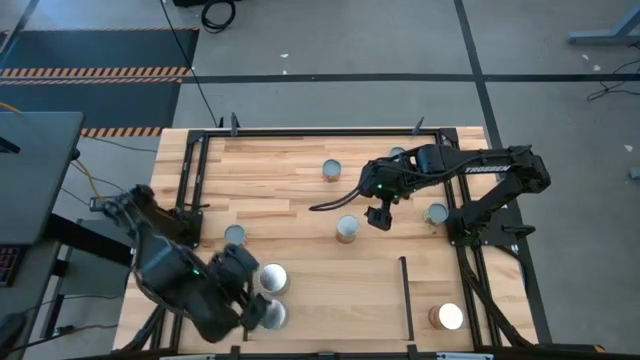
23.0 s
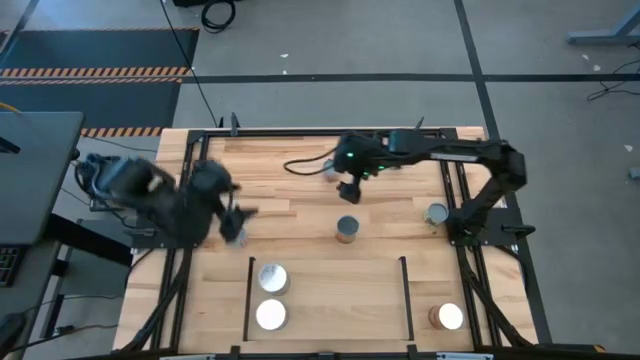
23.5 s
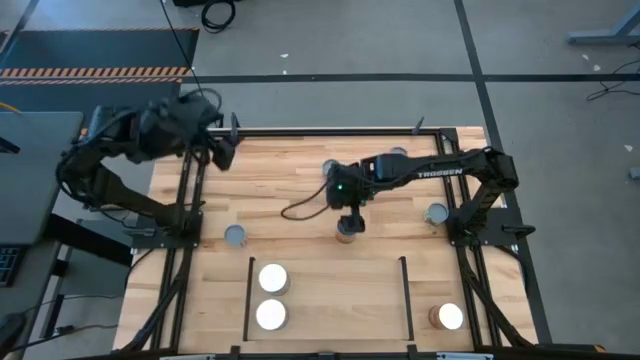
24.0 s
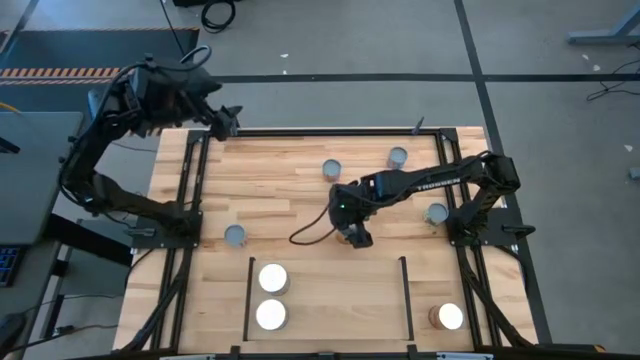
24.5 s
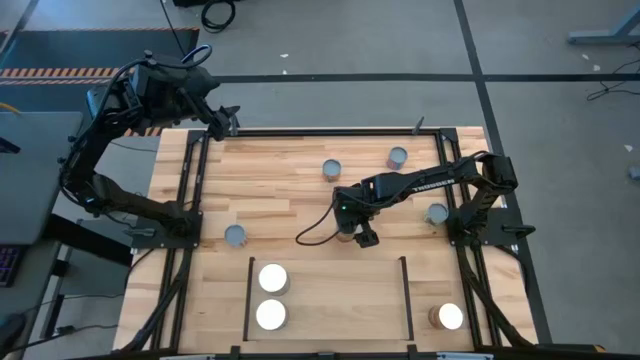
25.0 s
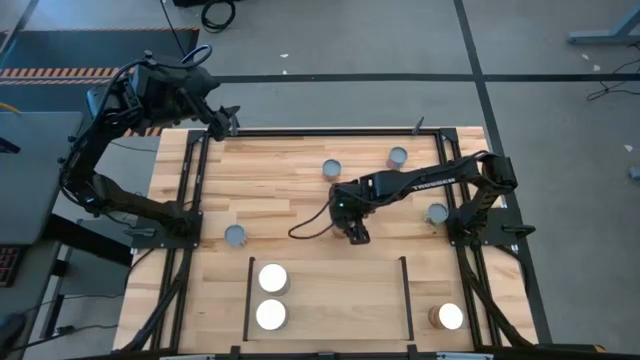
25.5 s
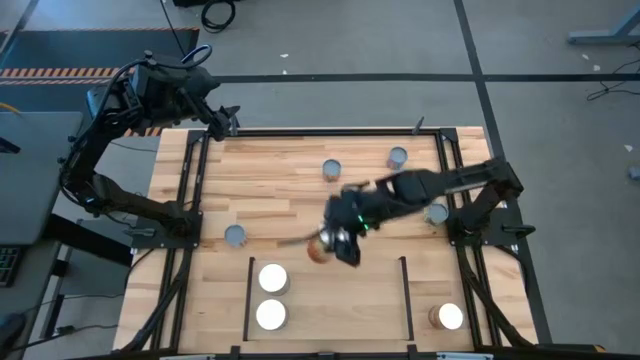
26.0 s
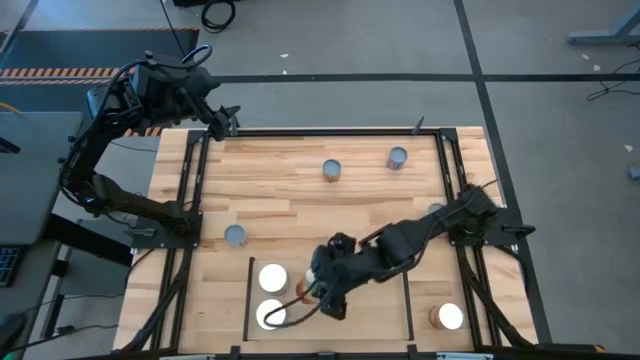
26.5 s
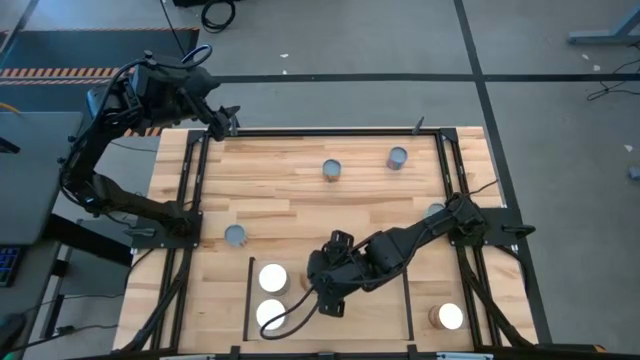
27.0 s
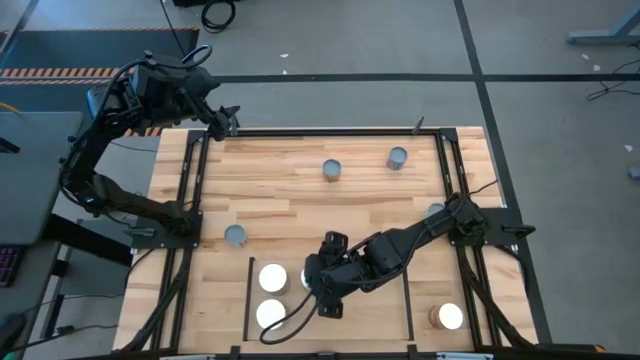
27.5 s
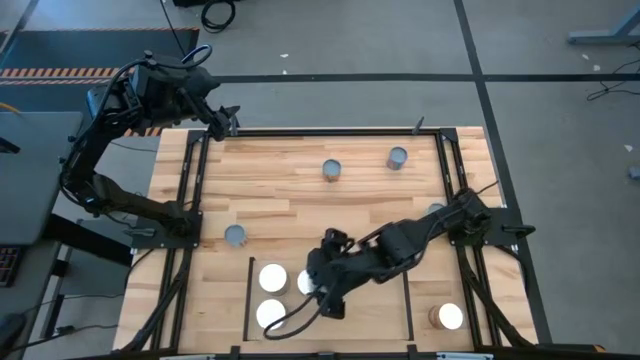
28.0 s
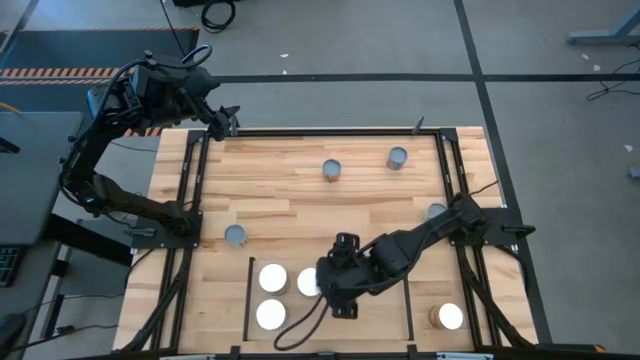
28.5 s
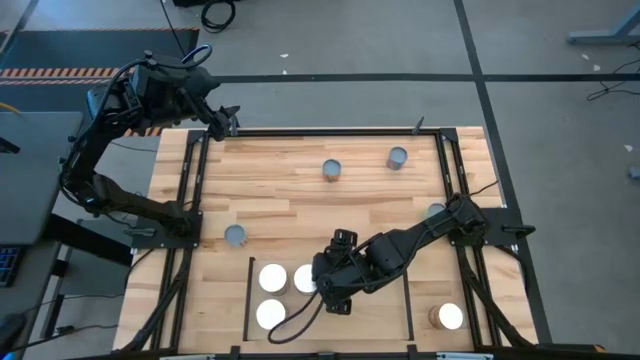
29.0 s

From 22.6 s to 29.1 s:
Task: Pick and place cans onto a shelf
Put the top large canned corn on the shelf

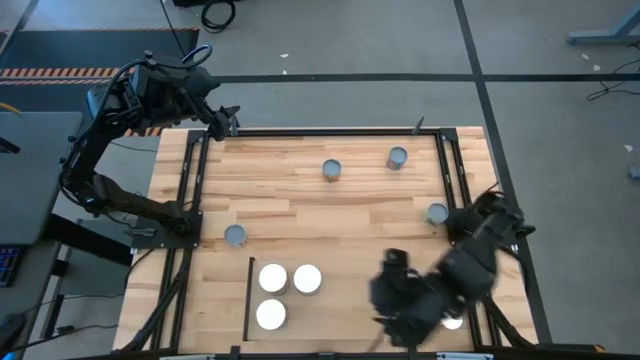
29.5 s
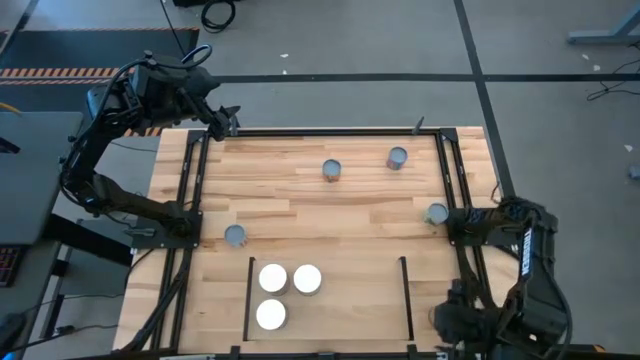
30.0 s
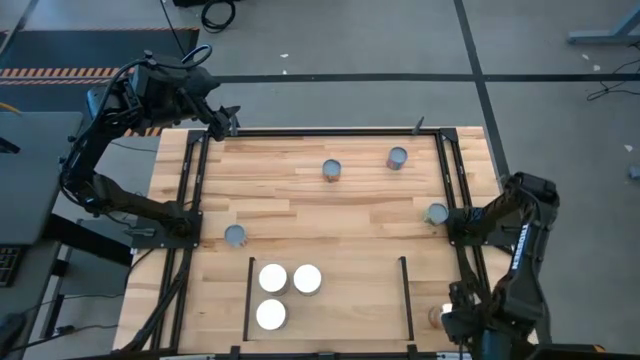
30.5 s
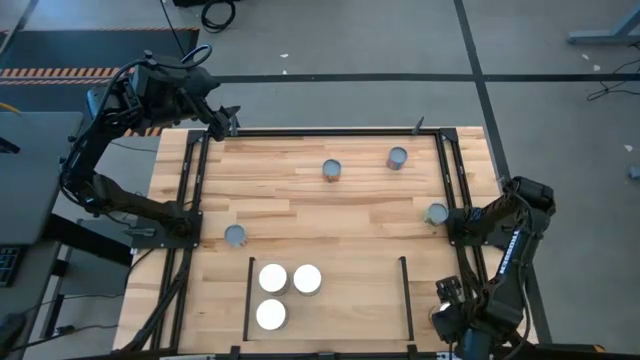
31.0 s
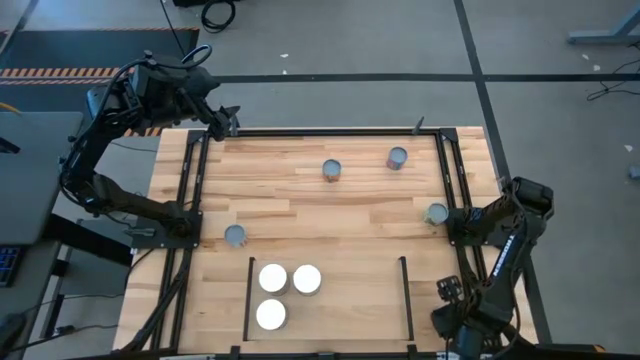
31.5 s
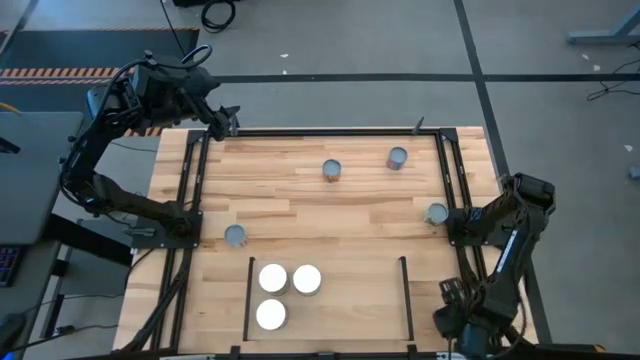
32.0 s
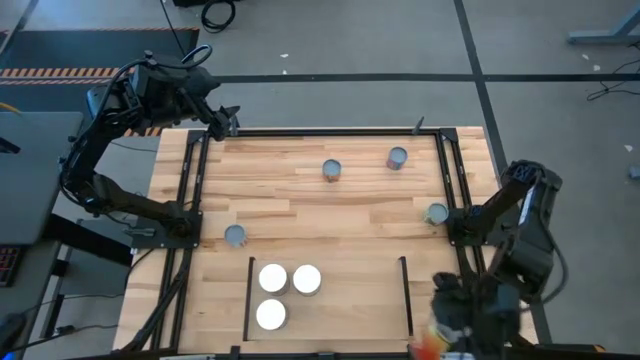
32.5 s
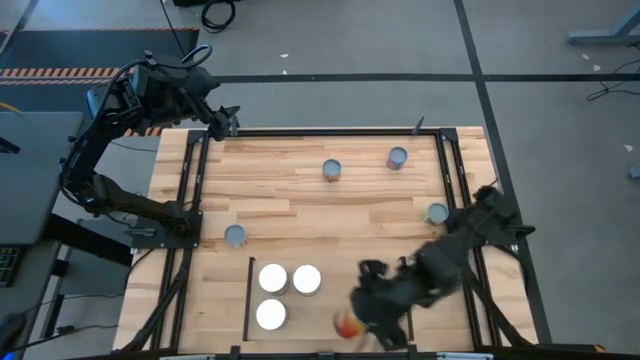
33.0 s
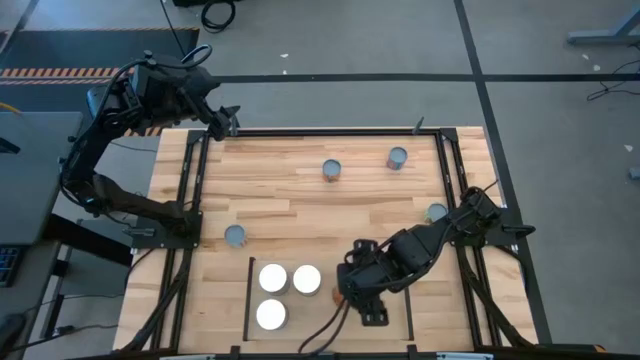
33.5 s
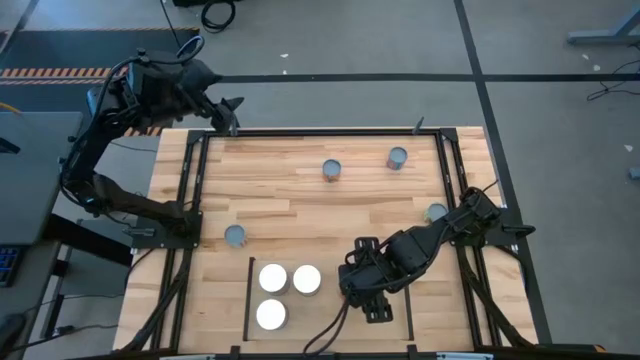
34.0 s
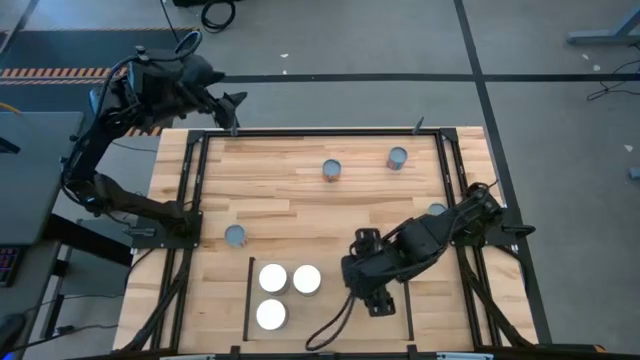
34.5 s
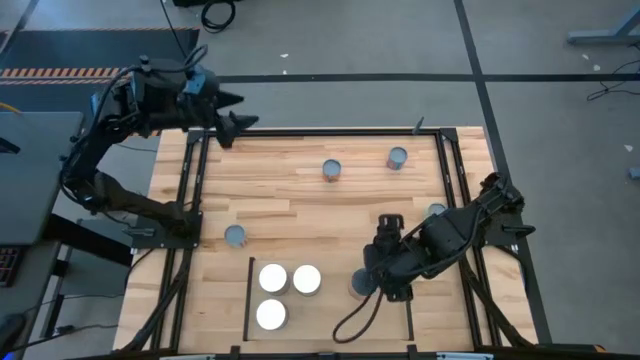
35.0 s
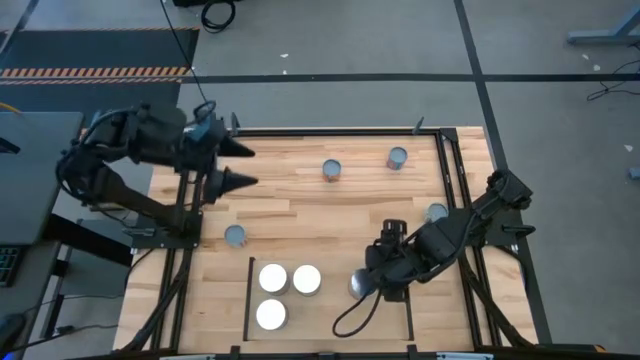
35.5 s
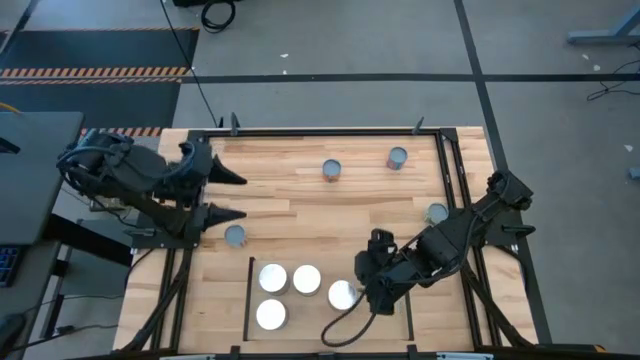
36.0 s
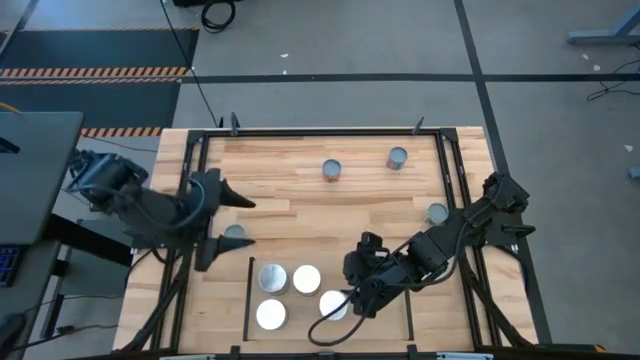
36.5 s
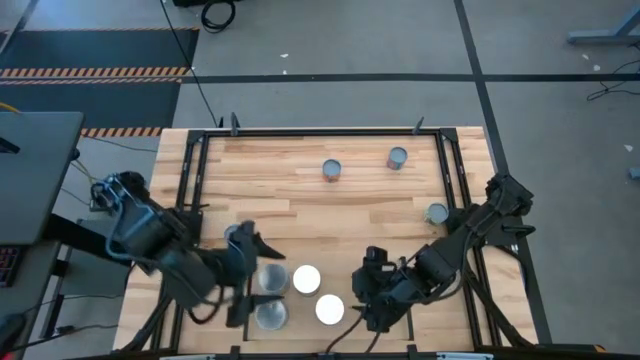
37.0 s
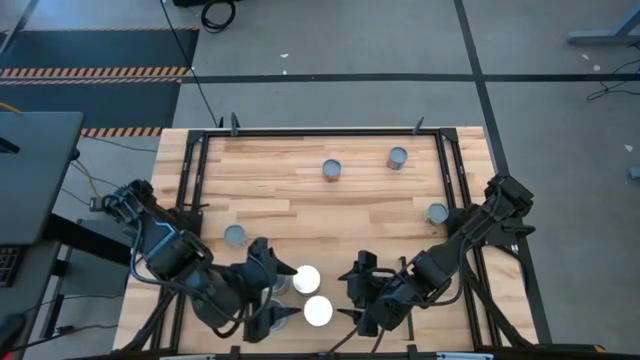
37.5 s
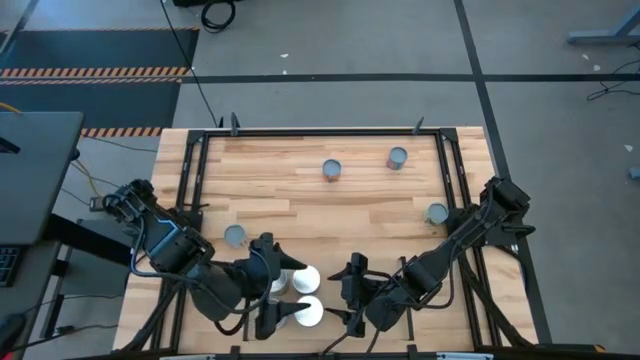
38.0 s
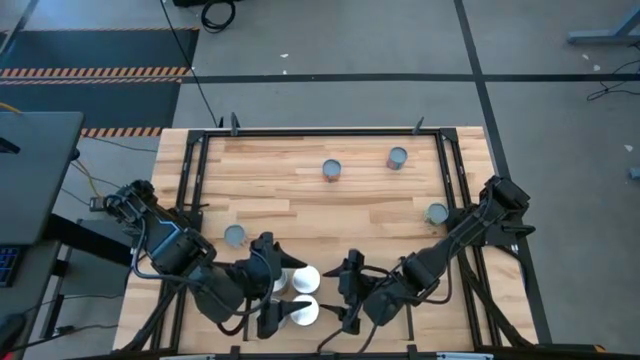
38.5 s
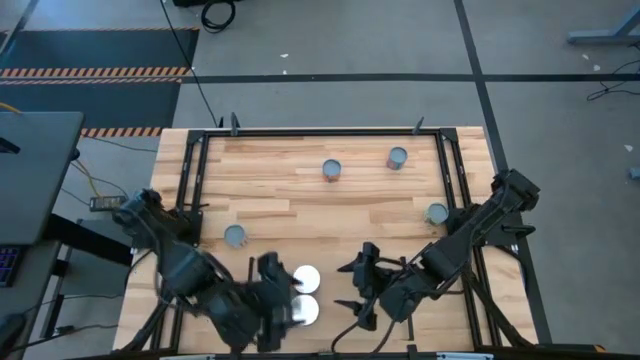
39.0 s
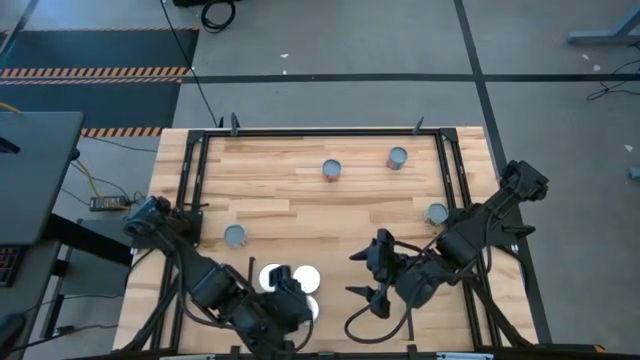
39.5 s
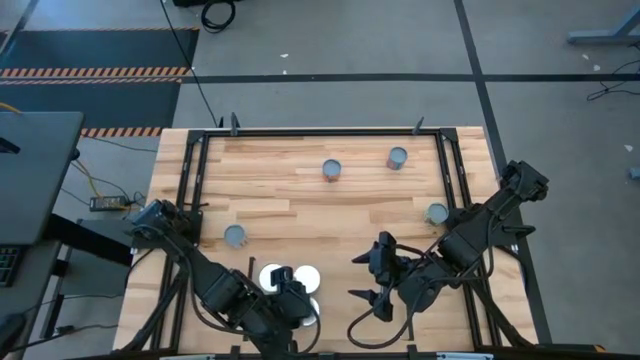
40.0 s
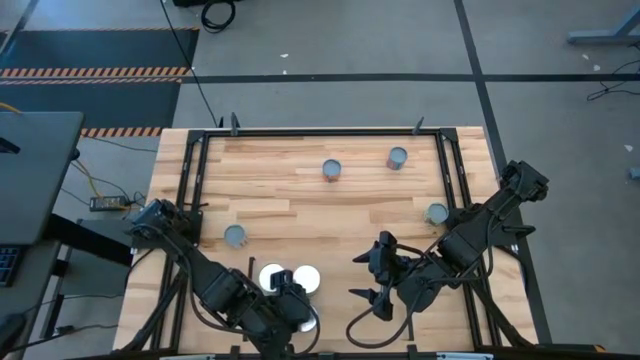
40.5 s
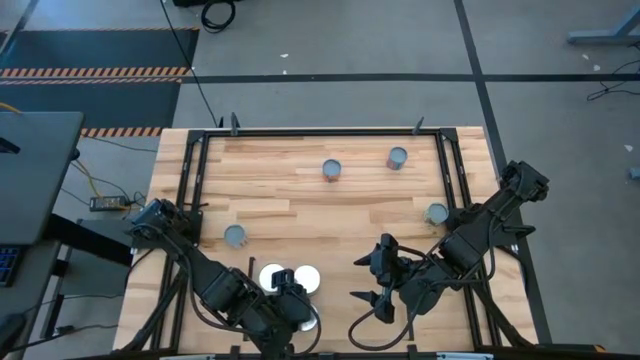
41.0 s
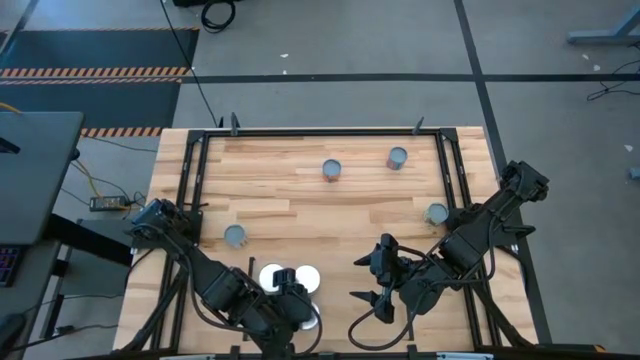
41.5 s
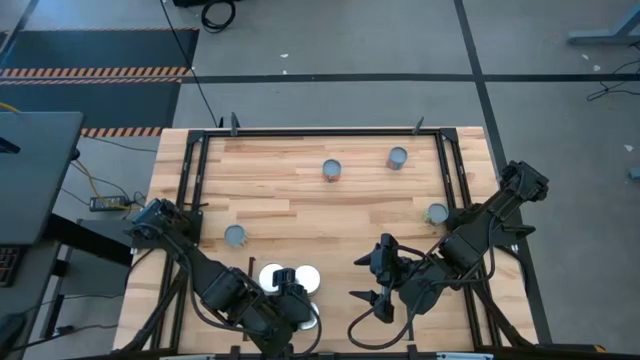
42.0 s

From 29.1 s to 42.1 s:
Put the large canned corn on the shelf aligned with the other canned corn

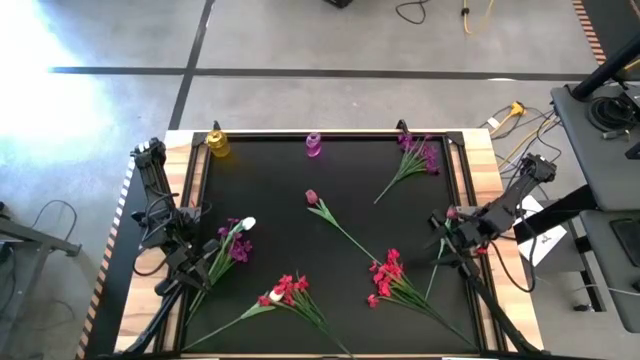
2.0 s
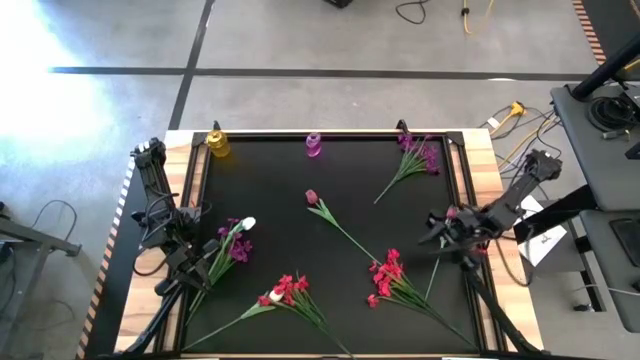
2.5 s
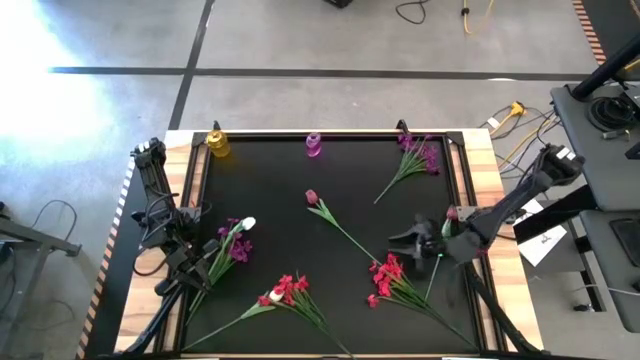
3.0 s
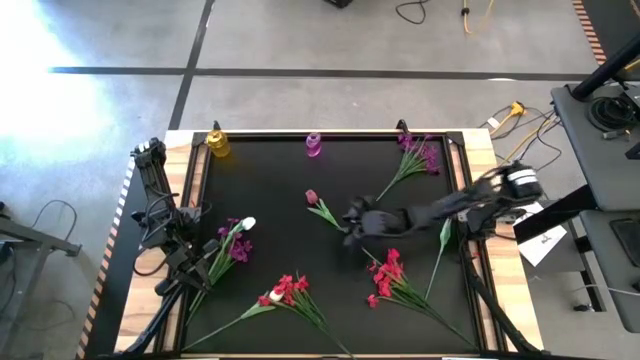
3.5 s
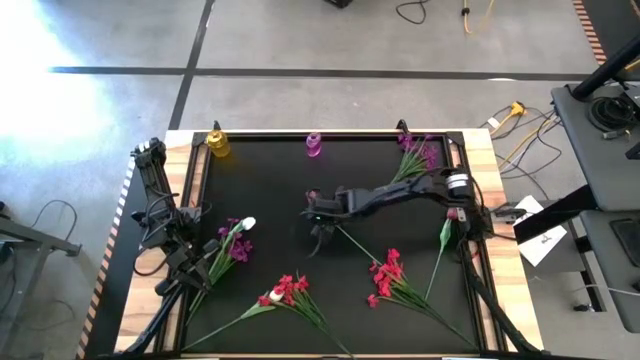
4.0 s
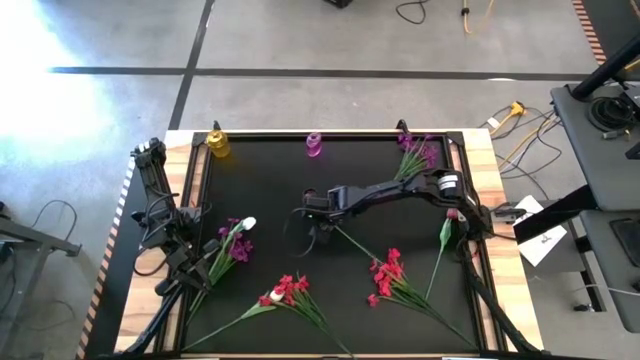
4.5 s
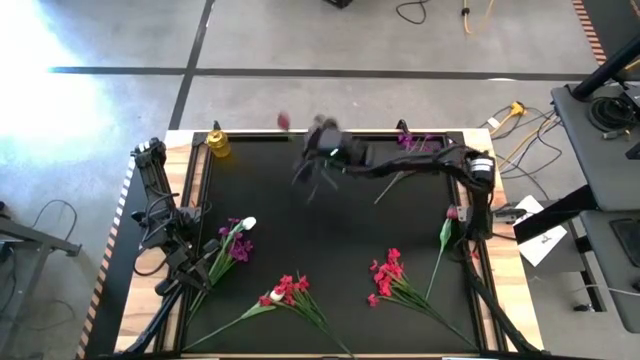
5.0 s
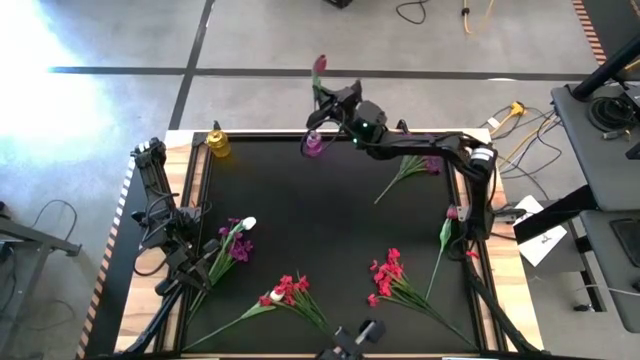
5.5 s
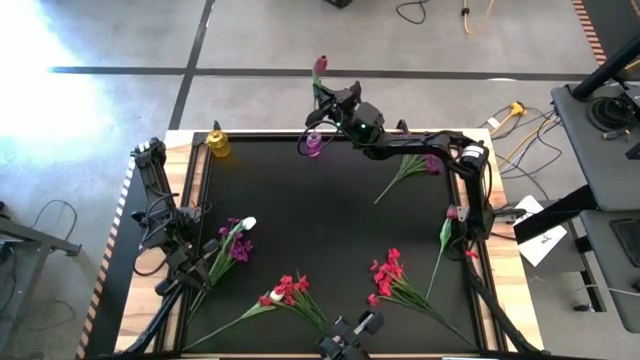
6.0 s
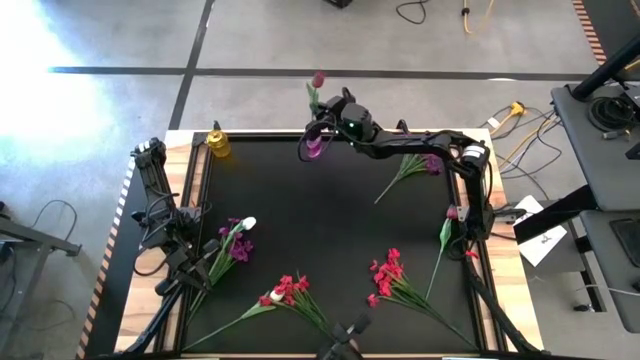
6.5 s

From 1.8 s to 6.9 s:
Task: Sort flowers into vase by color
Put the left red tulip into the purple vase
